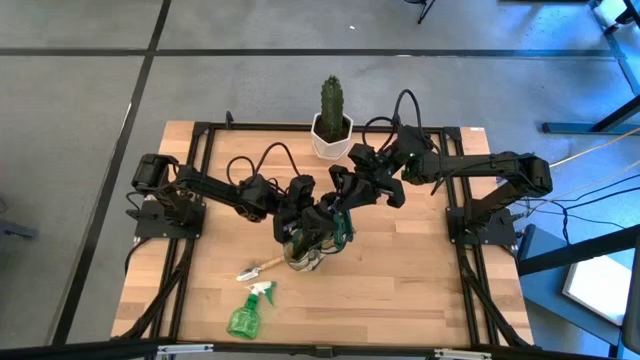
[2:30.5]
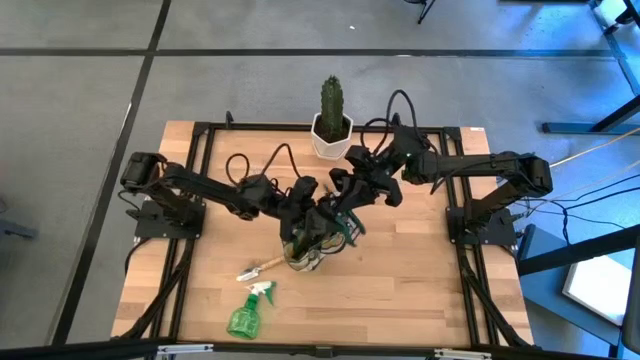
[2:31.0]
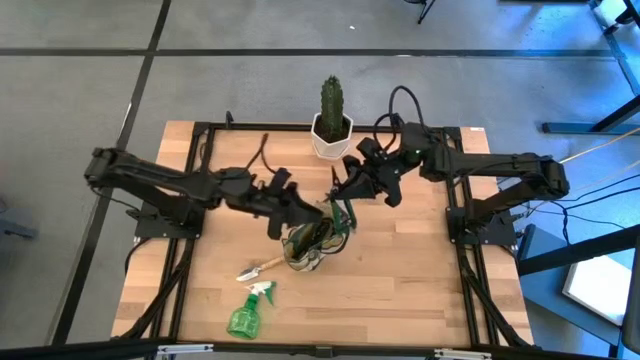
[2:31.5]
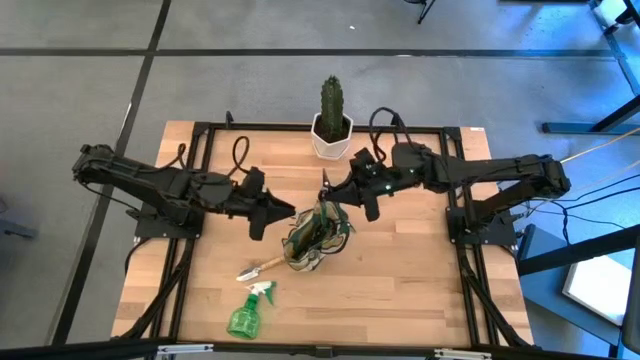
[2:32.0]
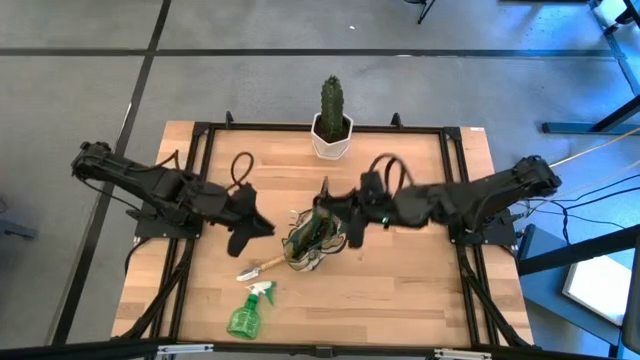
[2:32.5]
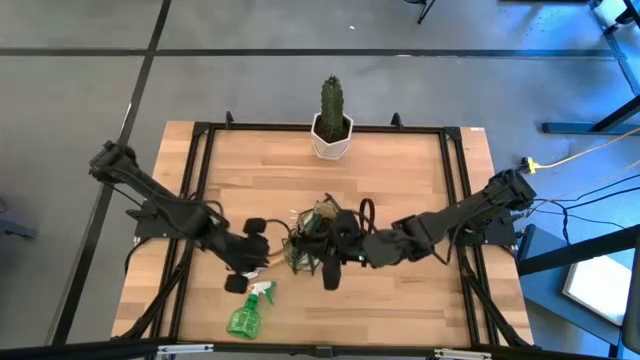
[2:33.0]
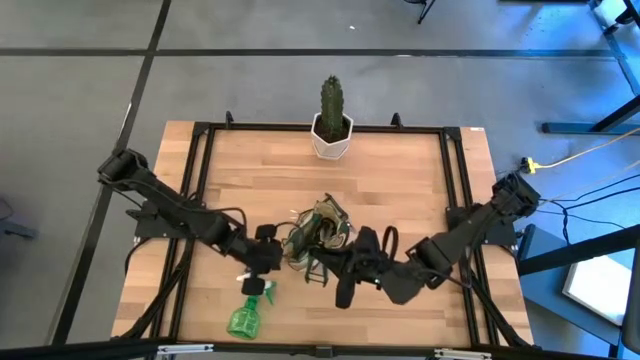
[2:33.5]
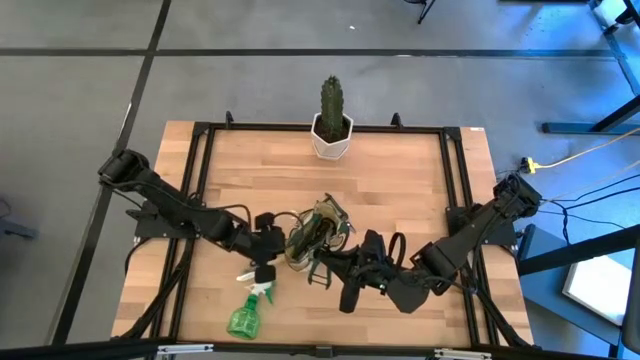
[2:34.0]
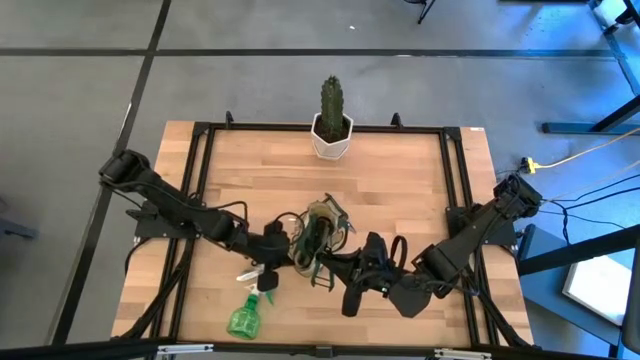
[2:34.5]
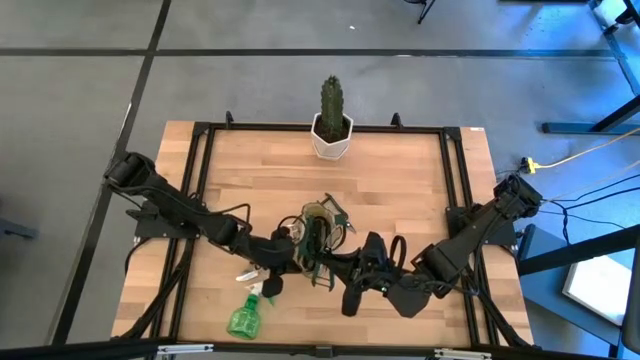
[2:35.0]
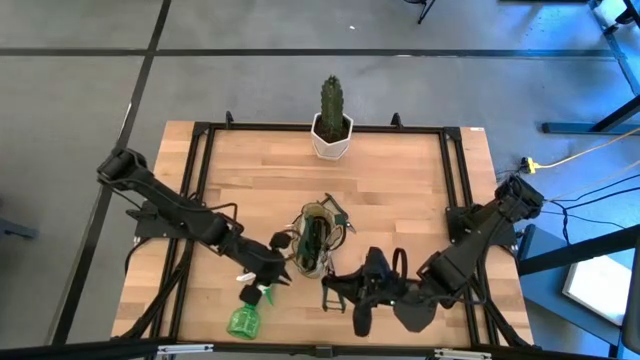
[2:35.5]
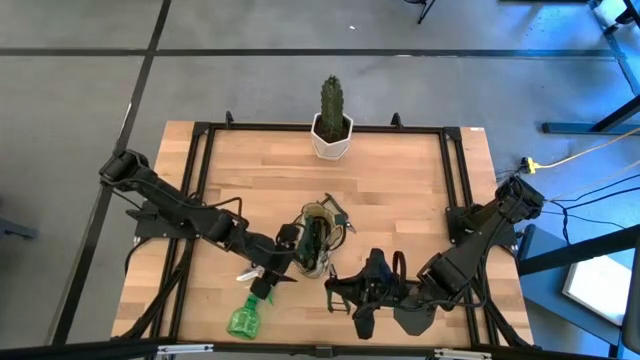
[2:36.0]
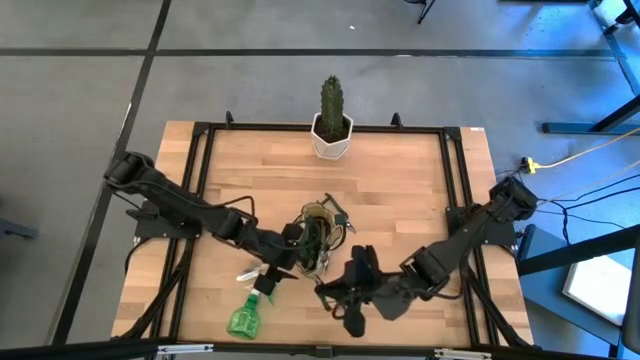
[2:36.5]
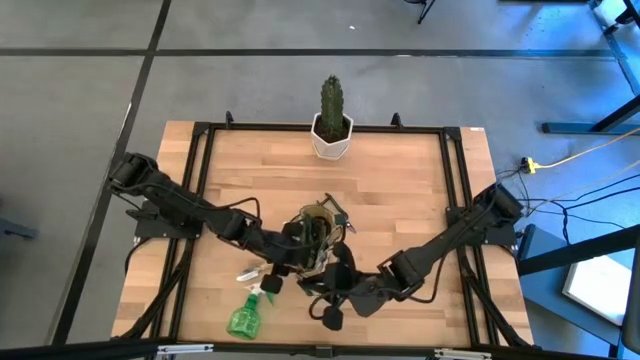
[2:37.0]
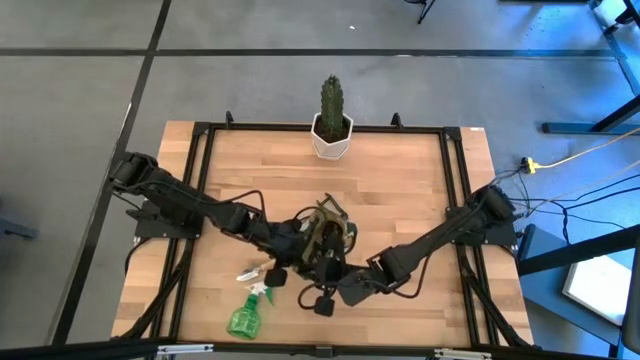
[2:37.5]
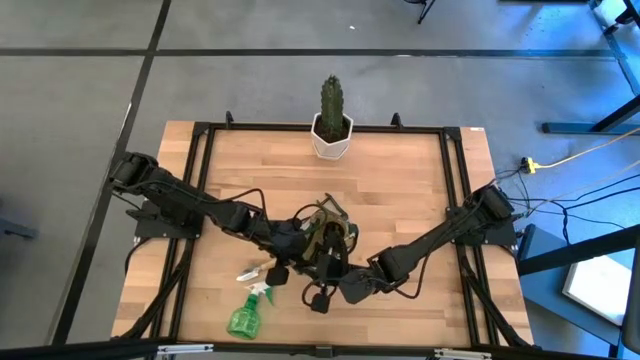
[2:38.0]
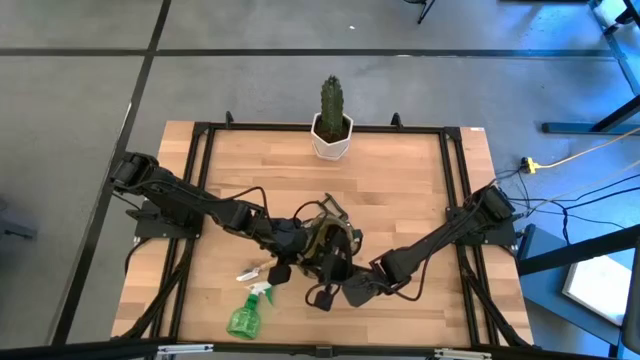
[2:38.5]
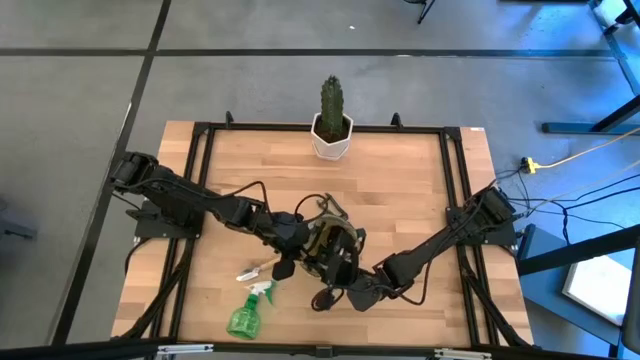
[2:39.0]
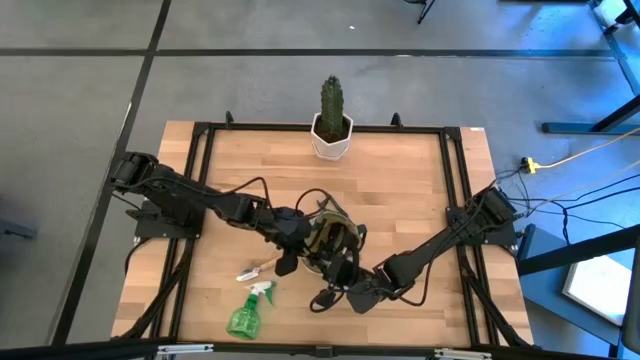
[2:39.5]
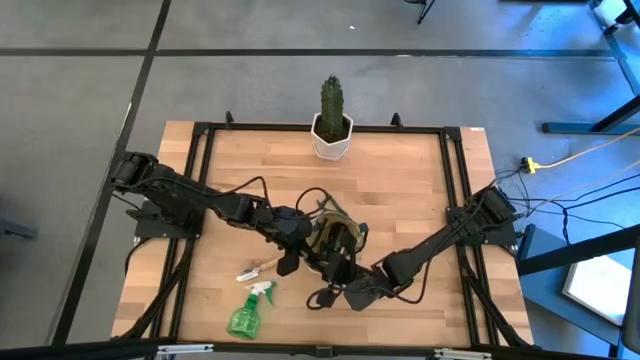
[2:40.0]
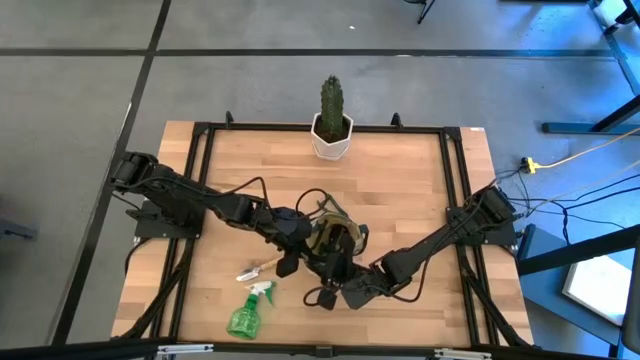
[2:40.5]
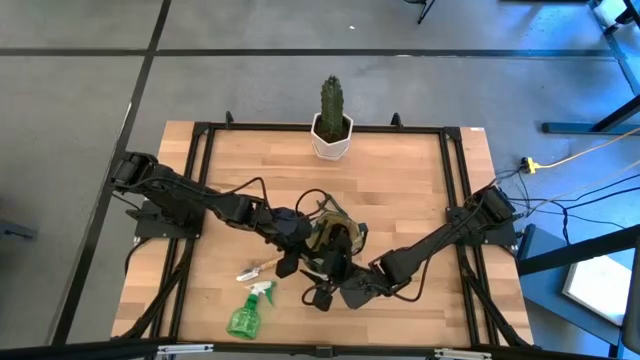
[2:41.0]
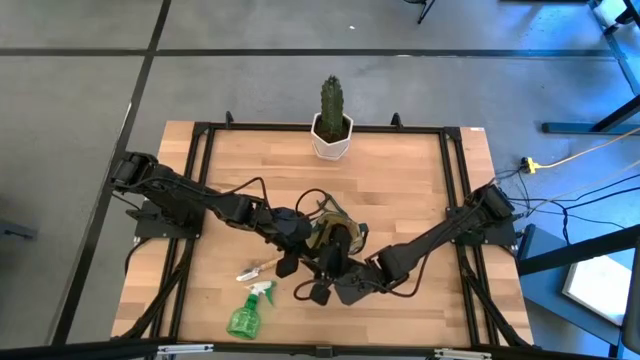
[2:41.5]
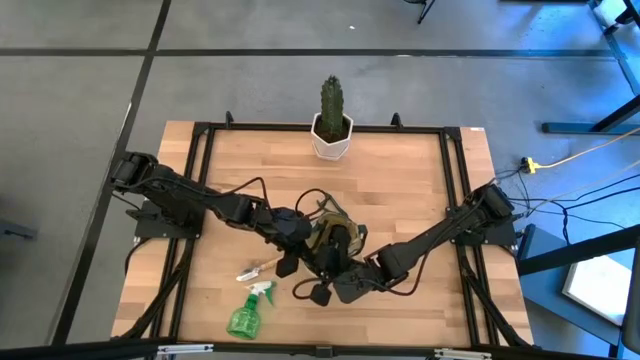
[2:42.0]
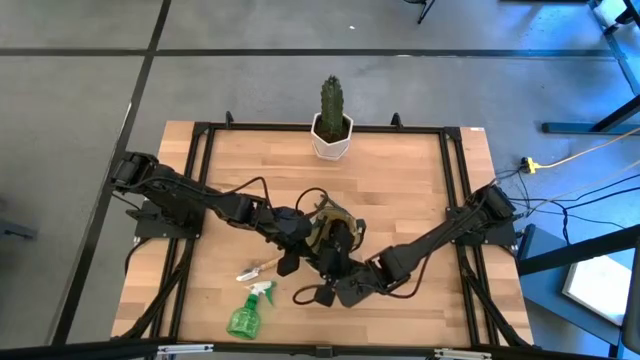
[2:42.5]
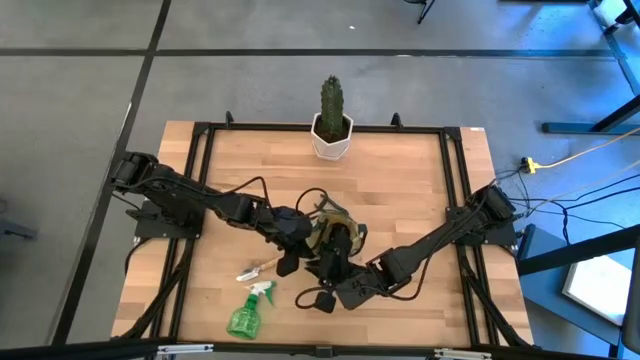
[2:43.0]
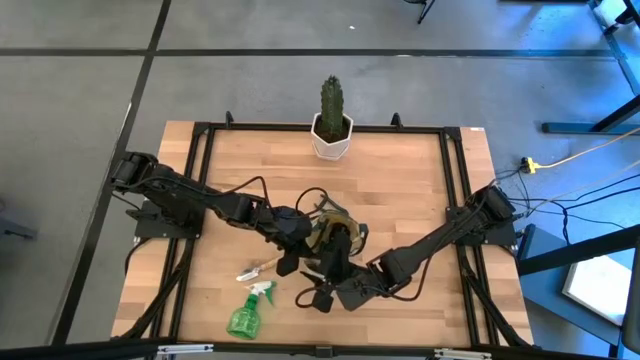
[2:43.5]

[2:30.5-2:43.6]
Task: Pick & Place Garden tools in Gardening bag
Put the left green fruit pruner into the green gardening bag

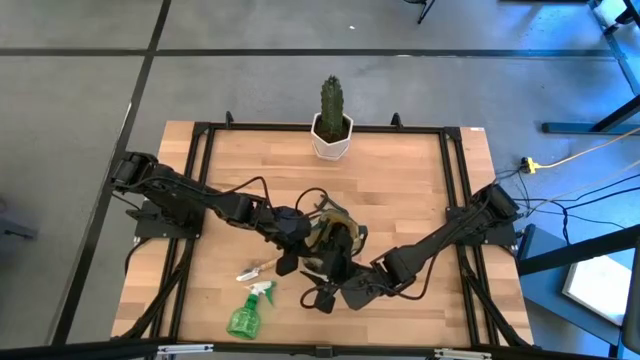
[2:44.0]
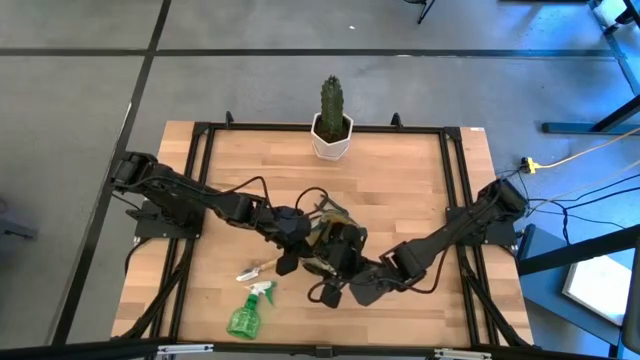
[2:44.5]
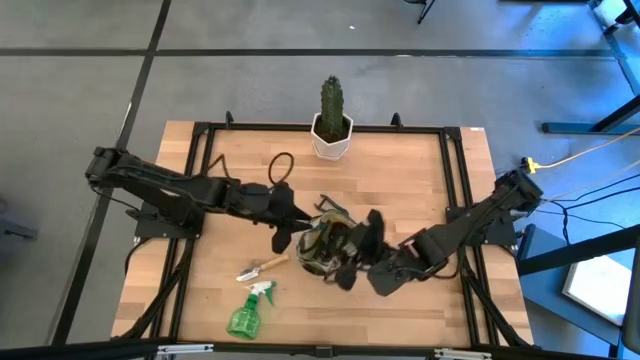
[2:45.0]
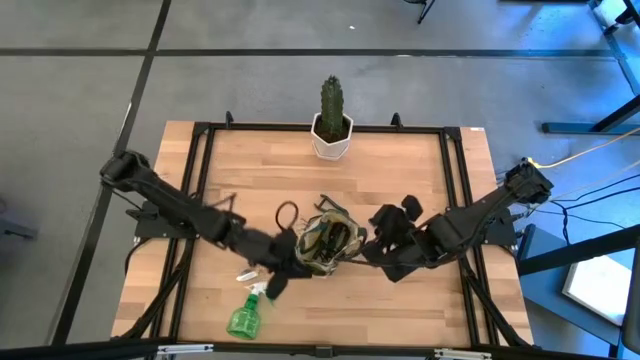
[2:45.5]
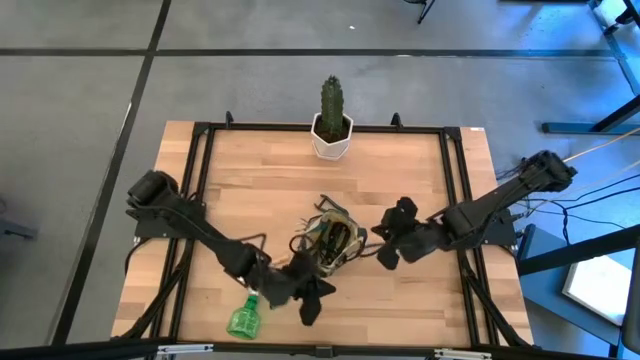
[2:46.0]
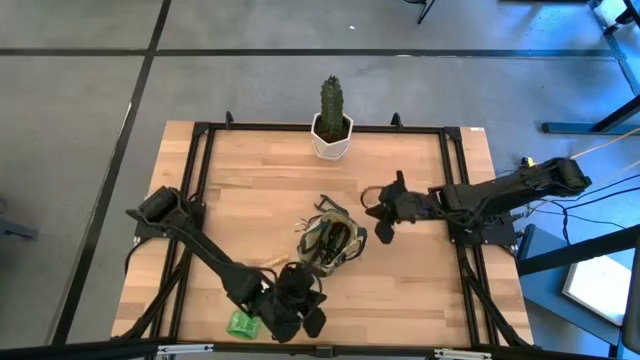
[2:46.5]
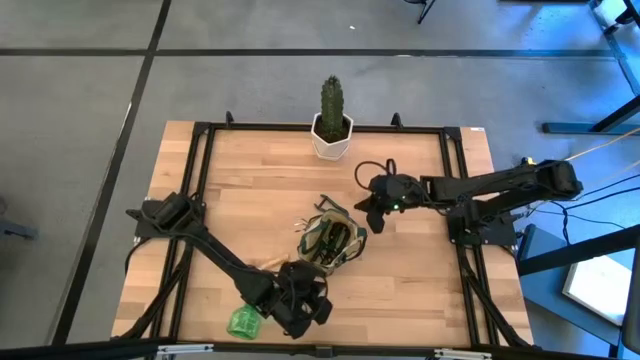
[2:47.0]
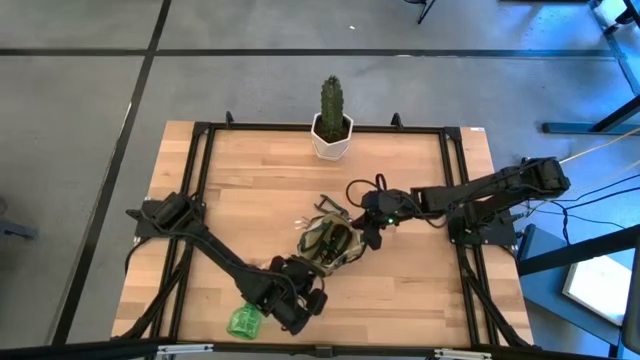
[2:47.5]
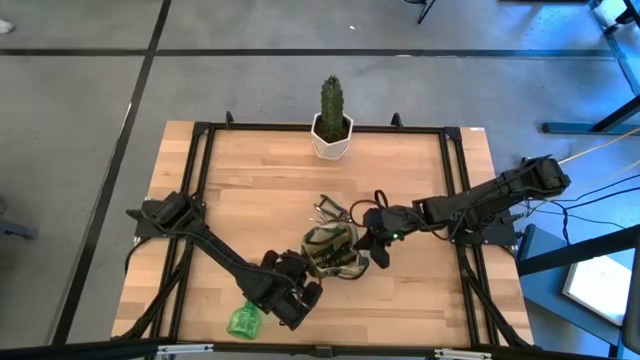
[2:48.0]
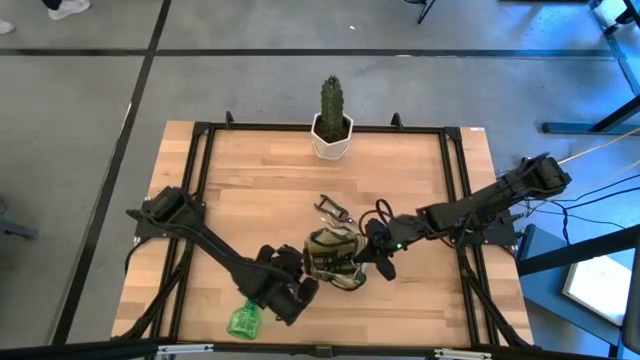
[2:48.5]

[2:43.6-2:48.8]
Adjust the green gardening bag

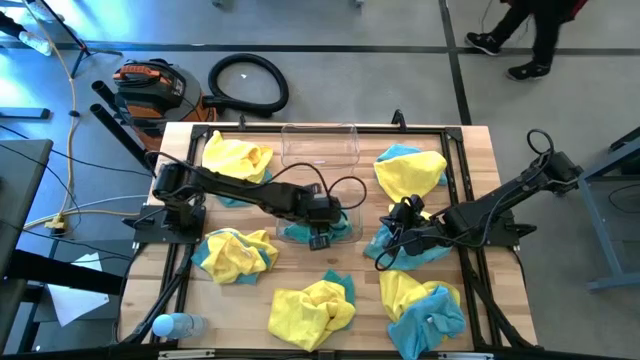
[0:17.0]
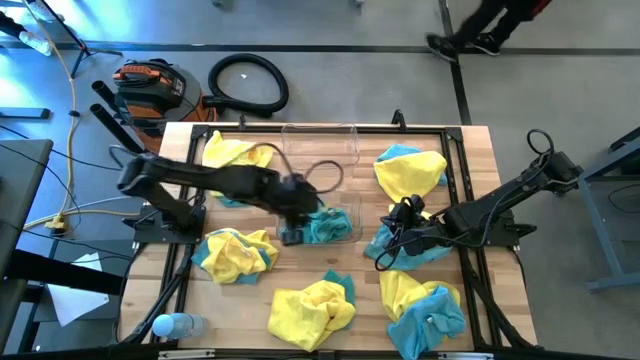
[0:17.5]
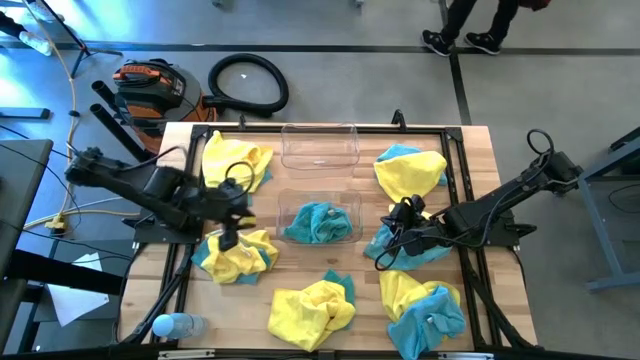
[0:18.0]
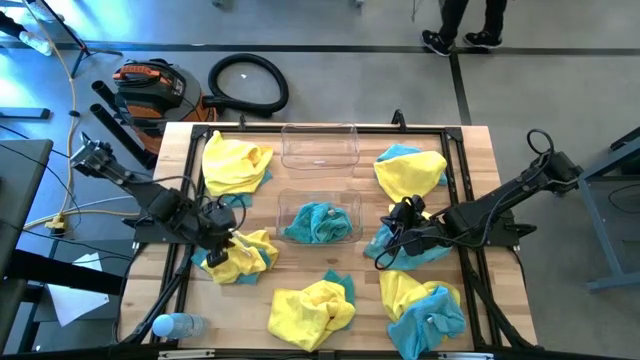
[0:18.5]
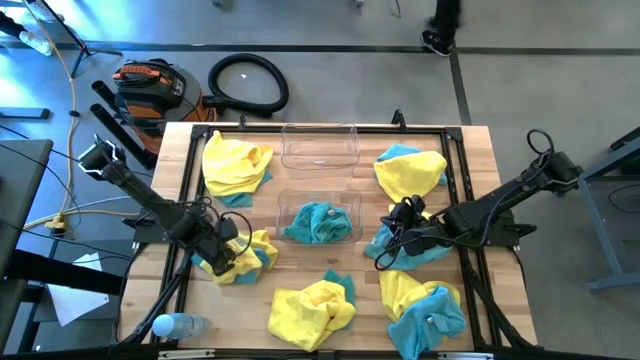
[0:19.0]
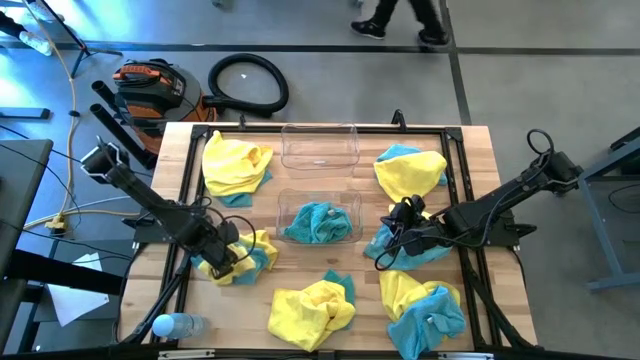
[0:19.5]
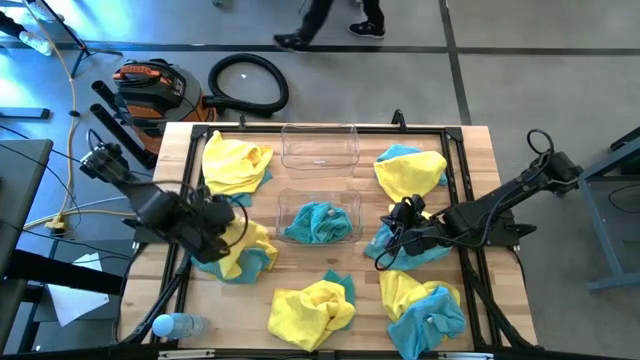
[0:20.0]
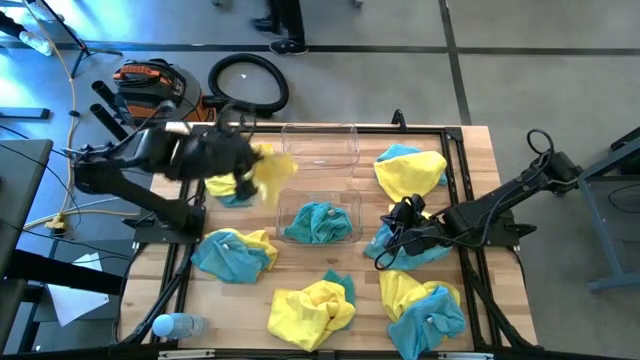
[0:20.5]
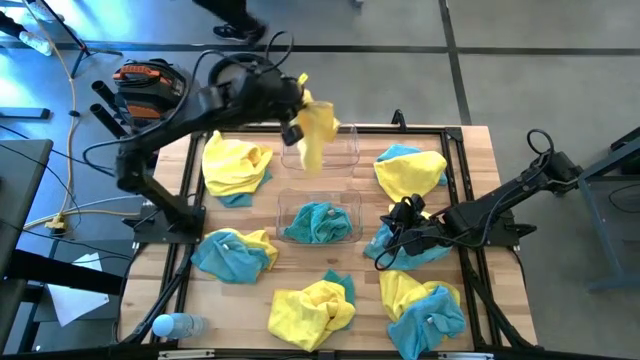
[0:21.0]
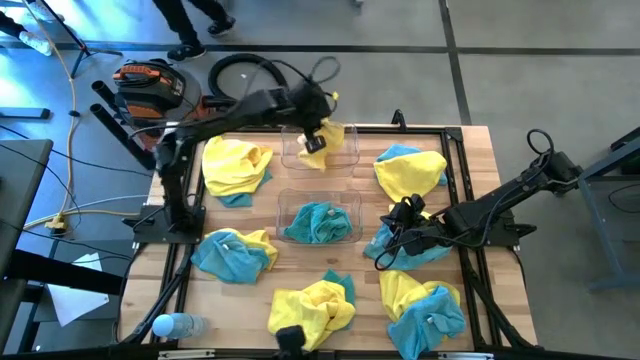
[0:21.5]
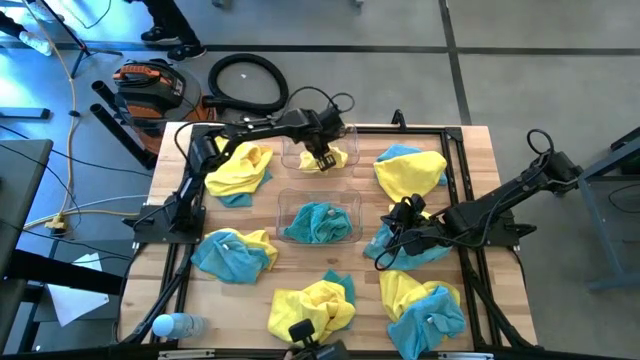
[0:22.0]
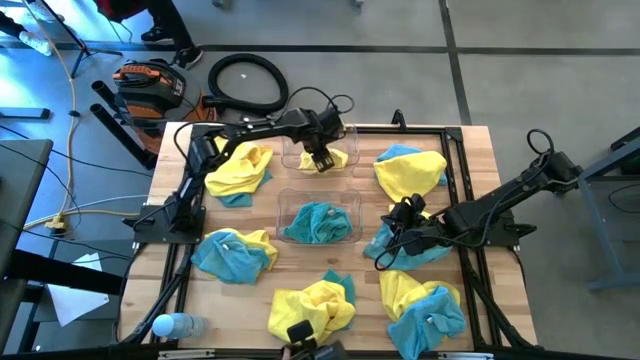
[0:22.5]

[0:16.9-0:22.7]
Task: Sort microfiber towel by color & place in baskets
Put the yellow microfiber towel into the top transparent bin
